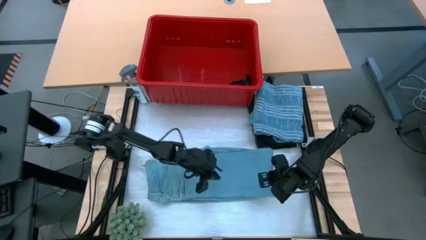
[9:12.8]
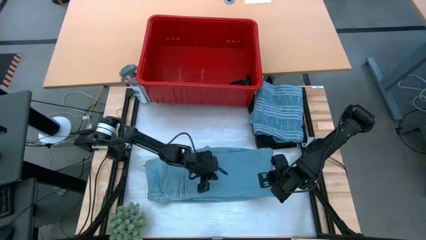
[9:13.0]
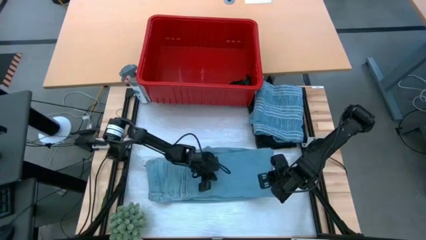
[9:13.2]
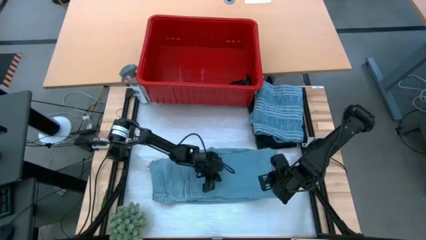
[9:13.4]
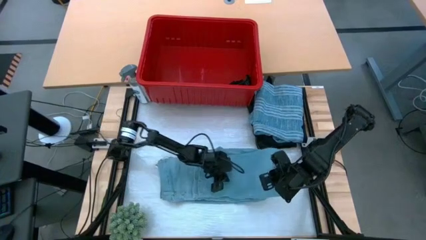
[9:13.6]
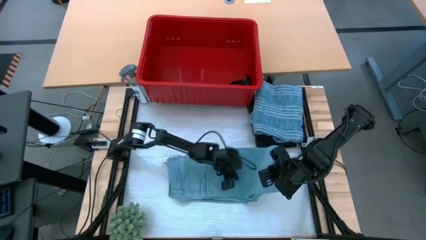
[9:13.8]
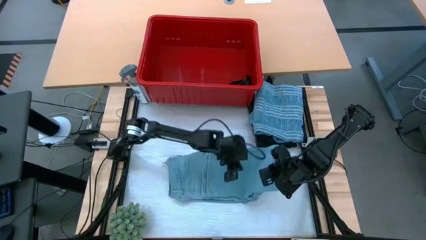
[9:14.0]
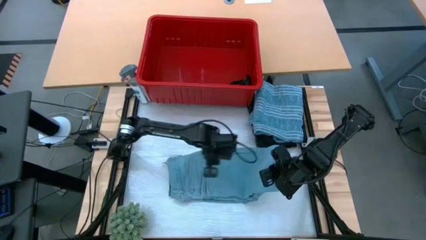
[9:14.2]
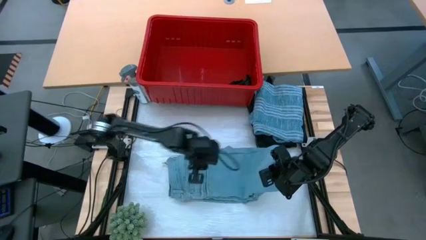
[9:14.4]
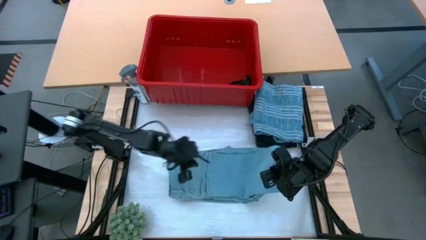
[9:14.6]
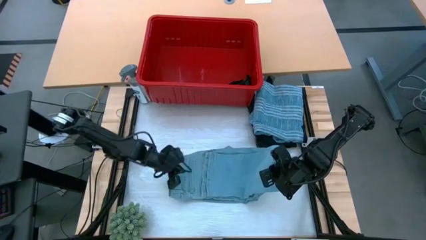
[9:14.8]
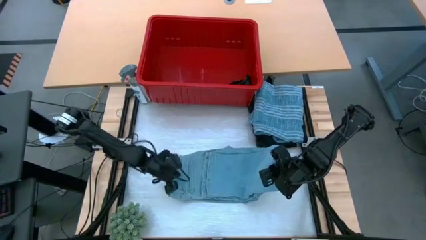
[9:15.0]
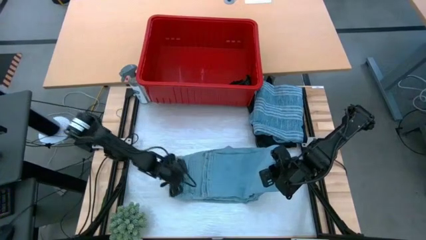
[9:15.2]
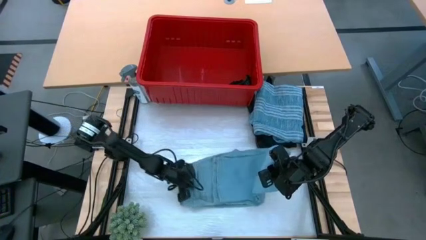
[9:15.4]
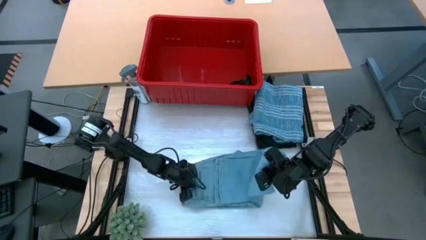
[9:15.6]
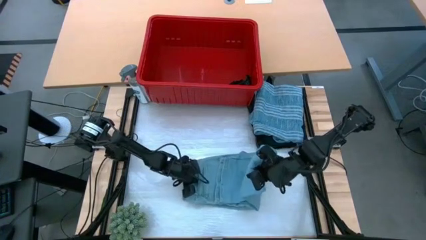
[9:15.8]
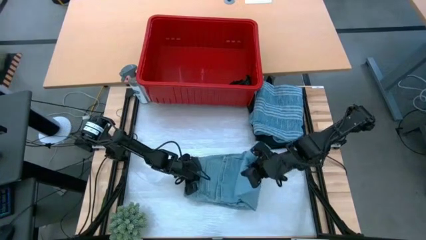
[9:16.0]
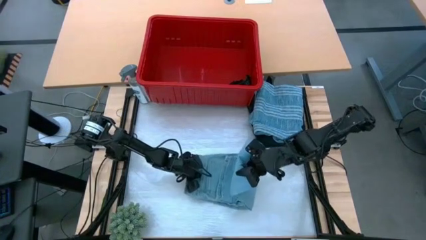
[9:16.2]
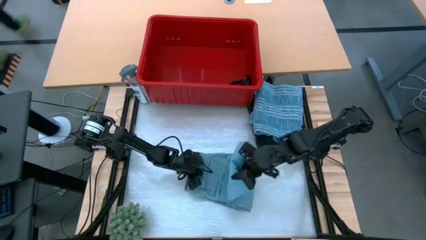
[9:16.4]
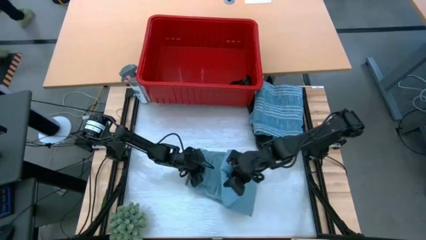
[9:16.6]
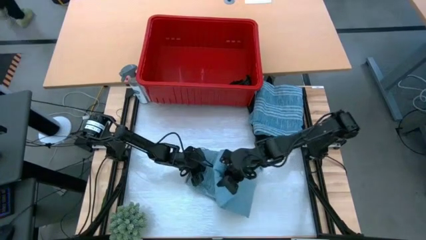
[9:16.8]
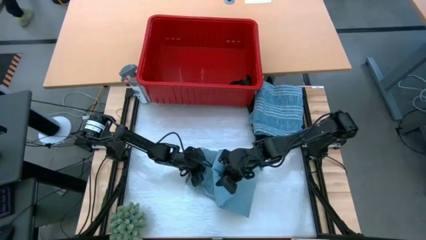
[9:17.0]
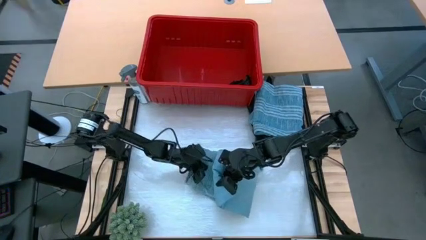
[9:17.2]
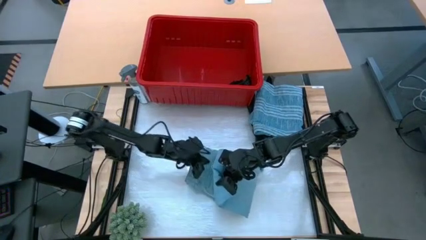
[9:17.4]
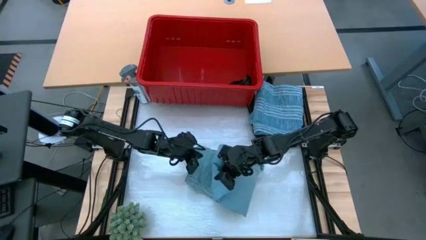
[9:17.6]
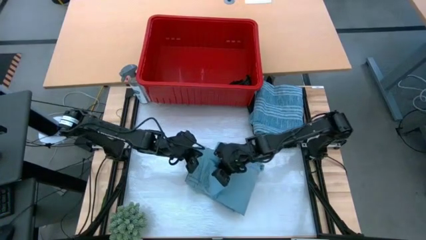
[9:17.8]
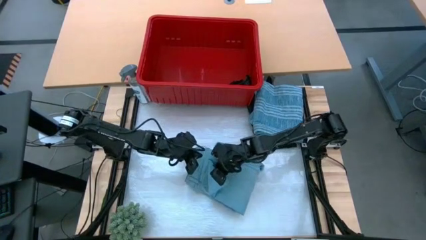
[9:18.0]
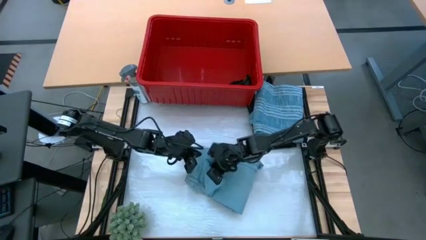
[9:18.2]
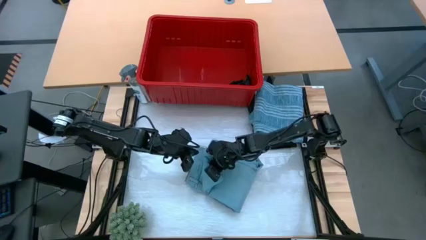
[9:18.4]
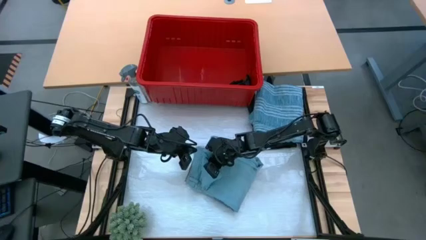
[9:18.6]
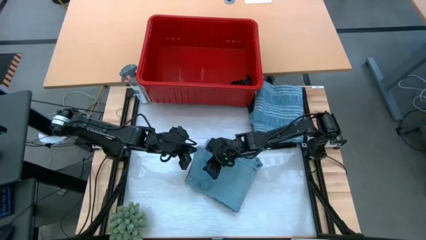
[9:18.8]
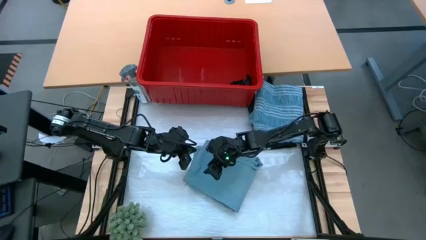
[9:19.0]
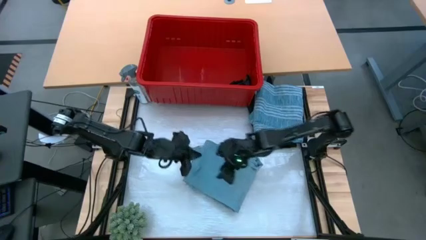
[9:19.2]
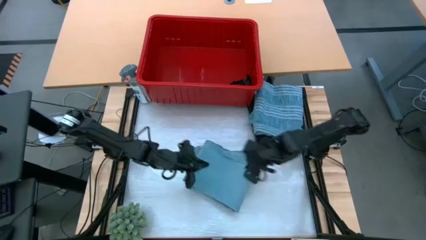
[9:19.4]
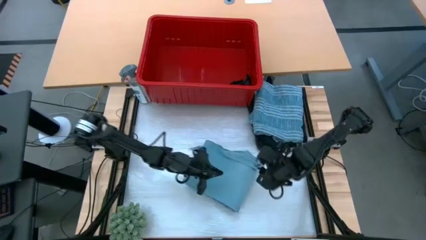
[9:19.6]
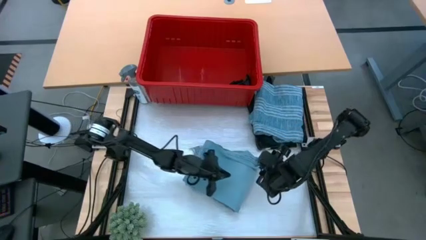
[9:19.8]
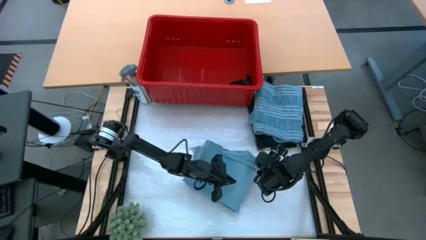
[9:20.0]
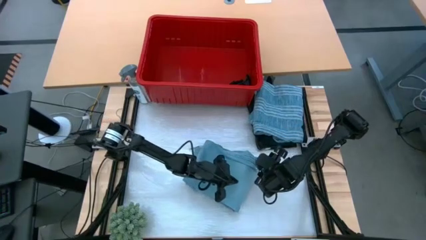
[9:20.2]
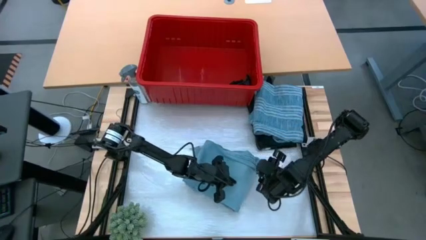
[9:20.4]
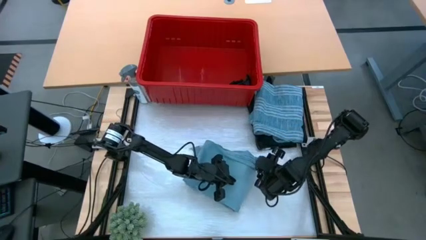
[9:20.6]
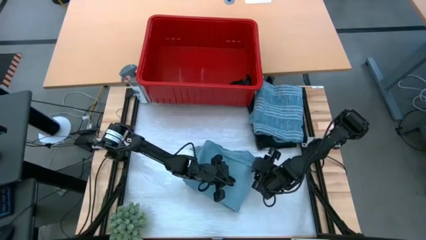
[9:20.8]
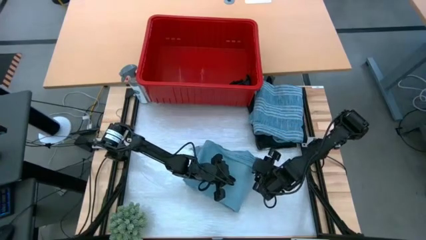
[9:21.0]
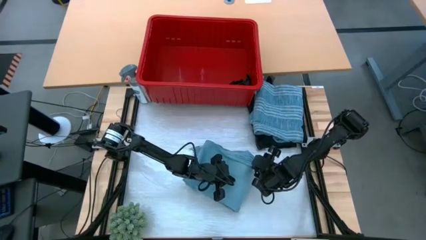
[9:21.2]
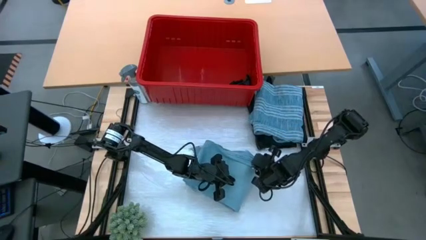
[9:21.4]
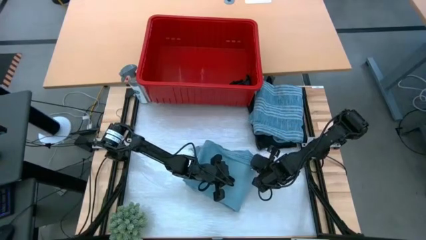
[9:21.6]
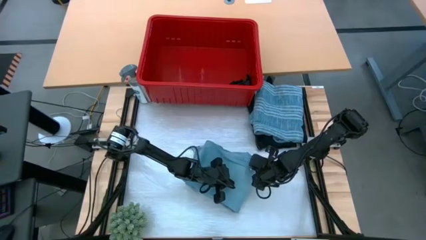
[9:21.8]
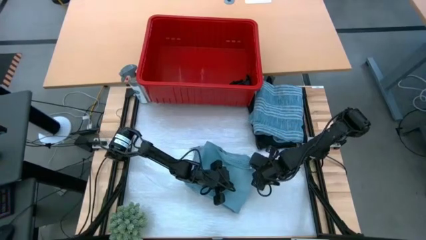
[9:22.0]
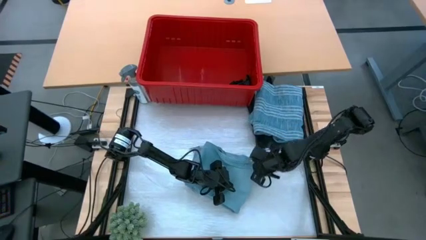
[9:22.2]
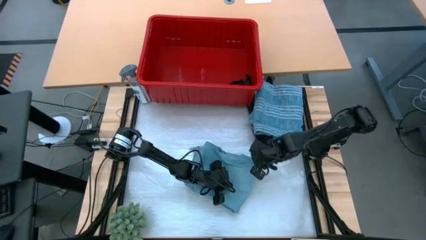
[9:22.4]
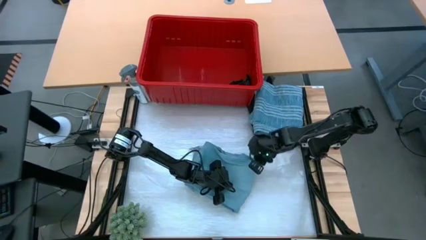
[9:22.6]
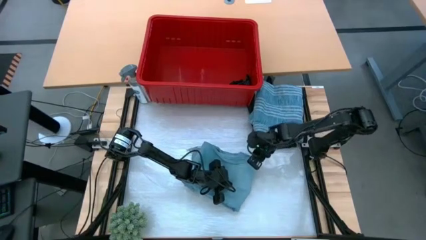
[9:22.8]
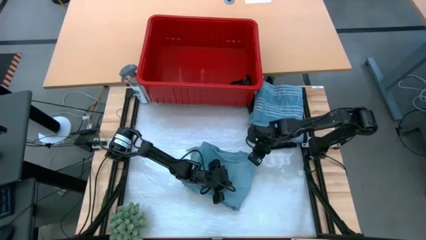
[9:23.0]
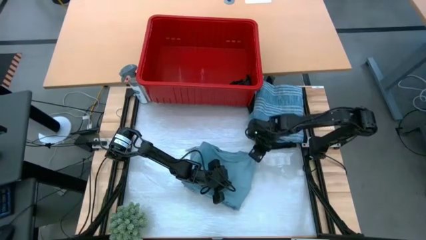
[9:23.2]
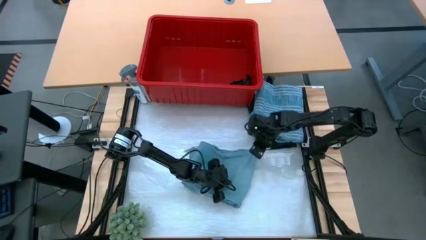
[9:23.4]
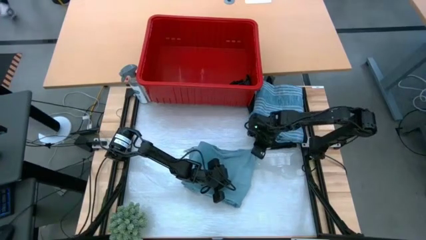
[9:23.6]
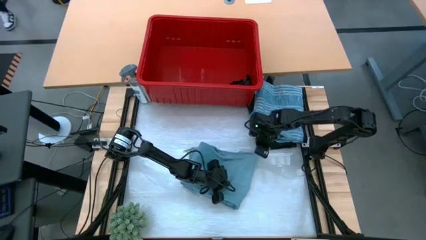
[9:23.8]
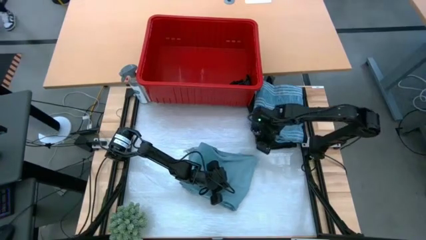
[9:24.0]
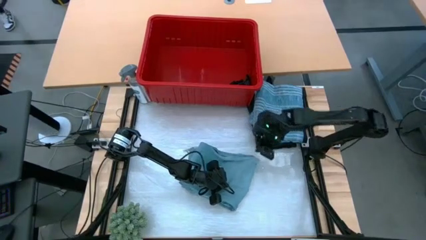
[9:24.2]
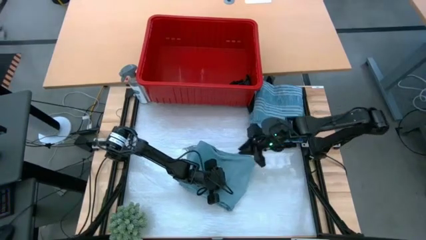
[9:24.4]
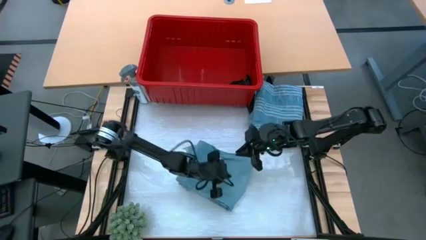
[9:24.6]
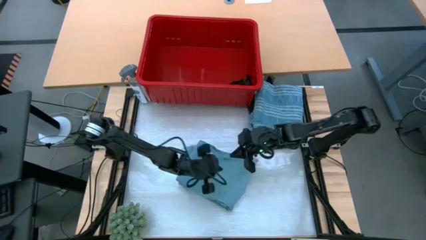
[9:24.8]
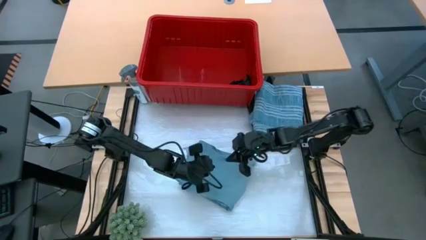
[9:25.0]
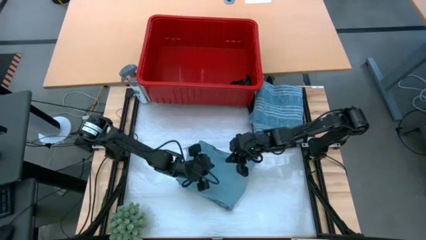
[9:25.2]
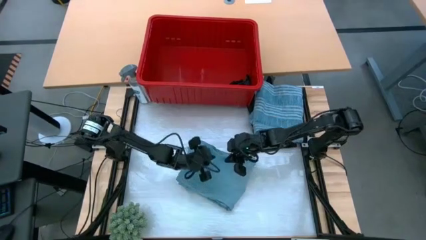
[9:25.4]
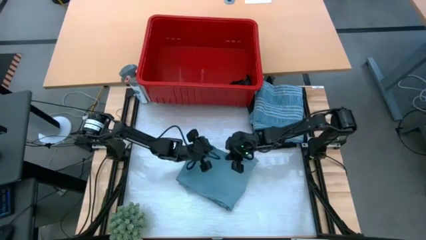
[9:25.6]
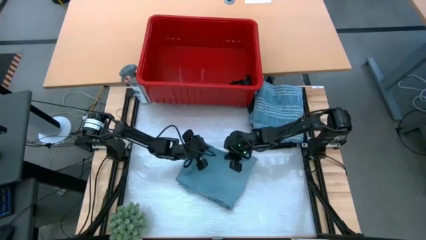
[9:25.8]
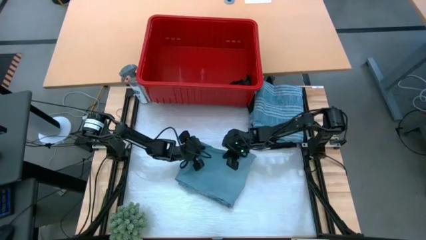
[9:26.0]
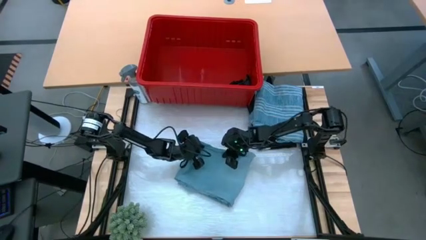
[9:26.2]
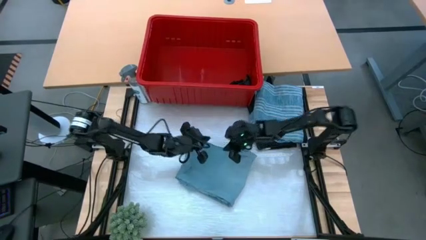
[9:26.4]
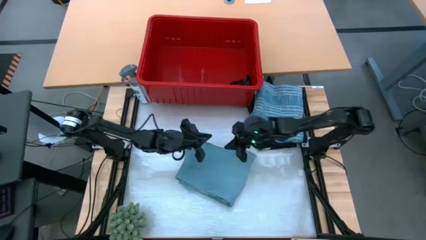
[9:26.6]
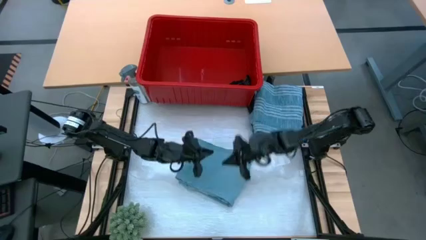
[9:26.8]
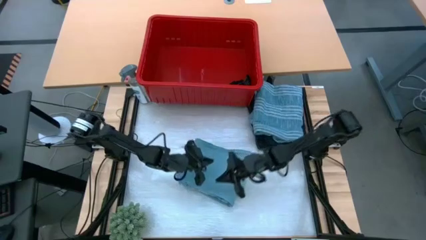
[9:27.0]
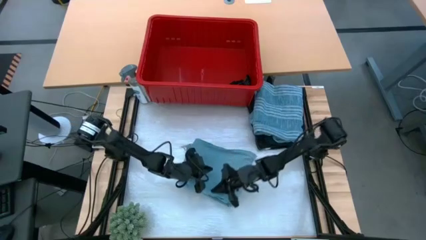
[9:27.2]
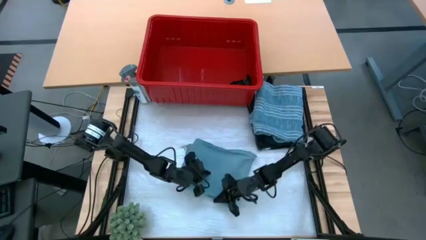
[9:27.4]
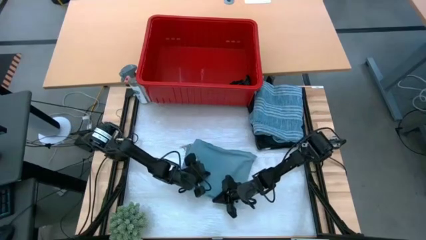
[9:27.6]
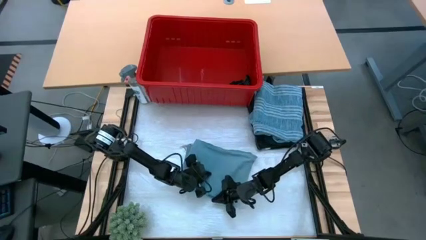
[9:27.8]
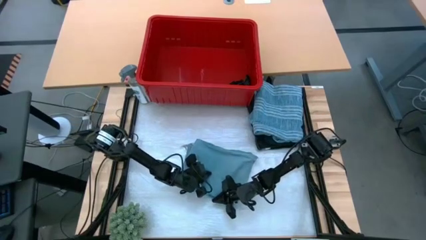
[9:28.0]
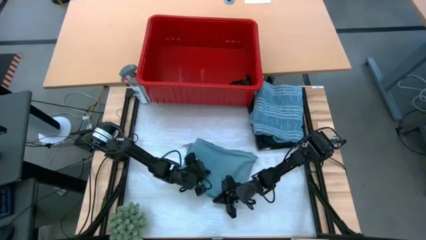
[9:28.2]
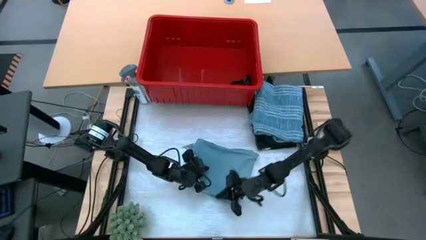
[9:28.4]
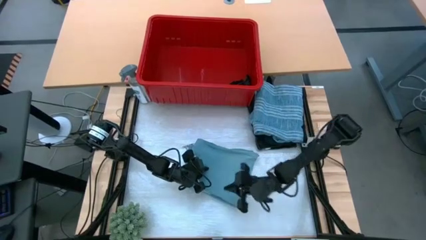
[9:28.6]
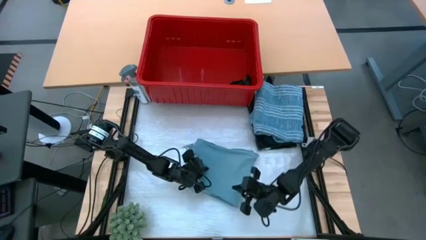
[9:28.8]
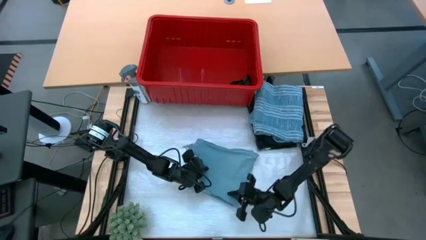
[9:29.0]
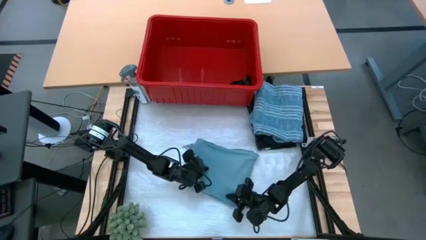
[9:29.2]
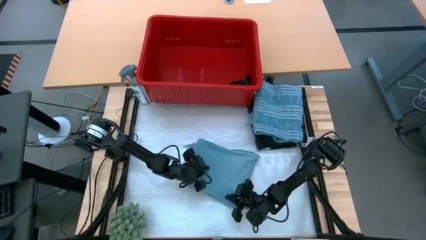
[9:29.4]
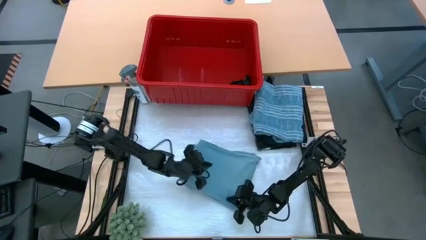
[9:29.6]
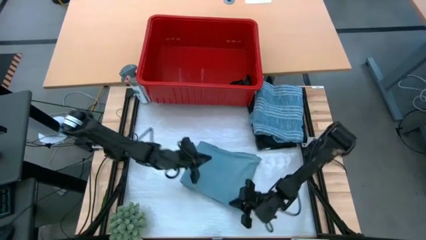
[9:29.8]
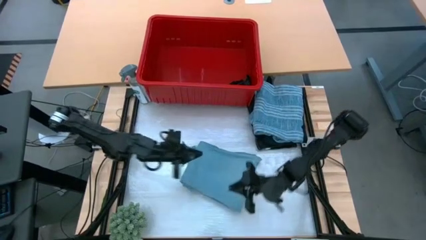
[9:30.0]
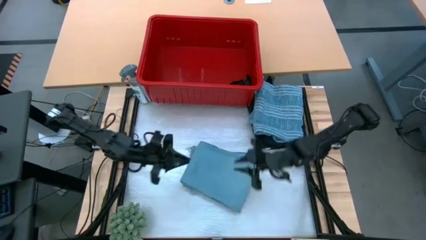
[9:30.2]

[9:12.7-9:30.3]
Task: Fold Laundry from Bin
Fold the light blue pants
